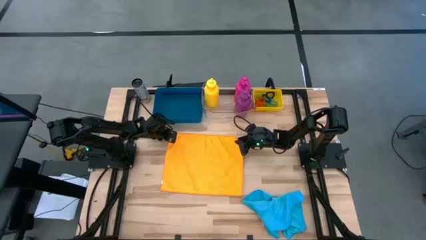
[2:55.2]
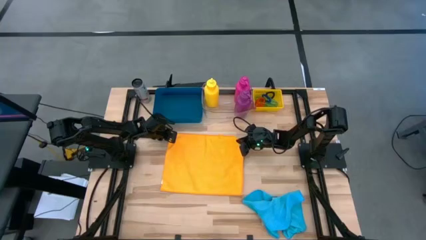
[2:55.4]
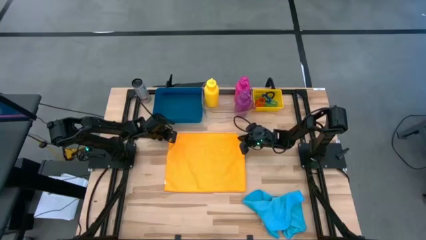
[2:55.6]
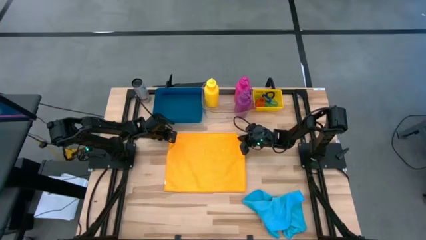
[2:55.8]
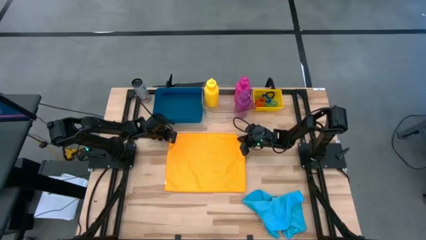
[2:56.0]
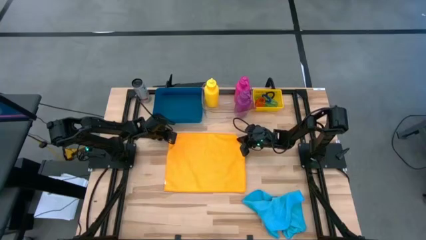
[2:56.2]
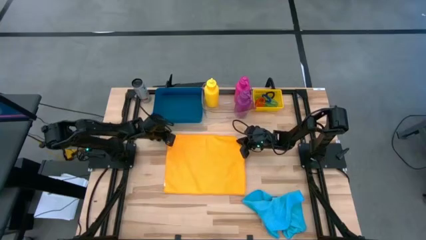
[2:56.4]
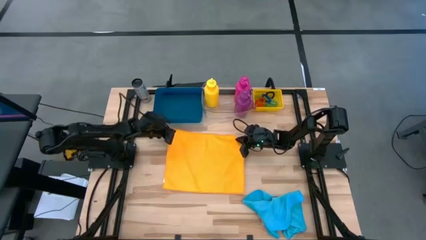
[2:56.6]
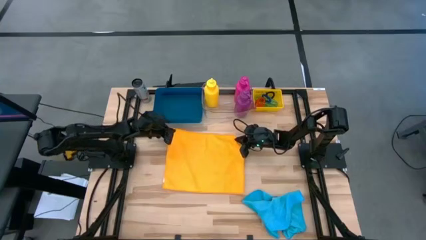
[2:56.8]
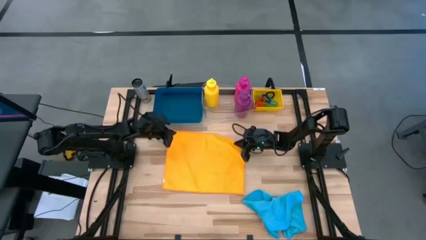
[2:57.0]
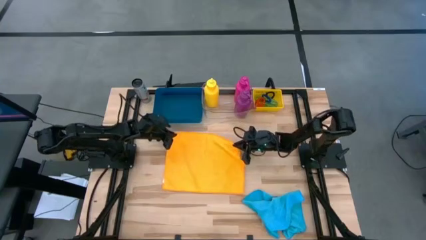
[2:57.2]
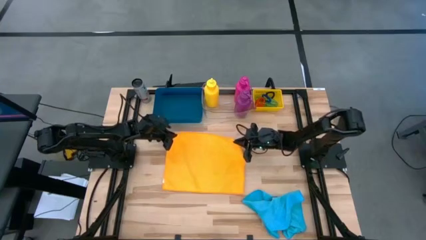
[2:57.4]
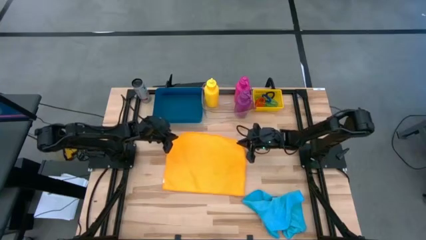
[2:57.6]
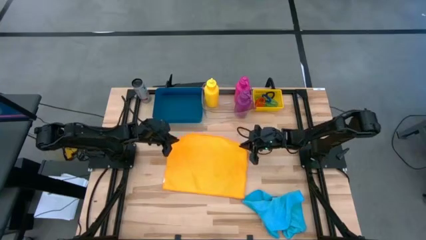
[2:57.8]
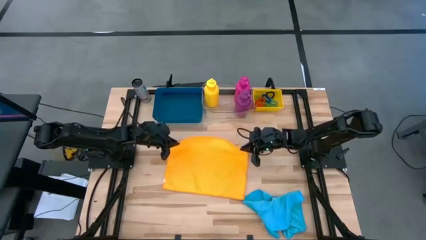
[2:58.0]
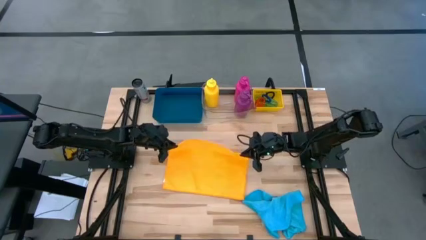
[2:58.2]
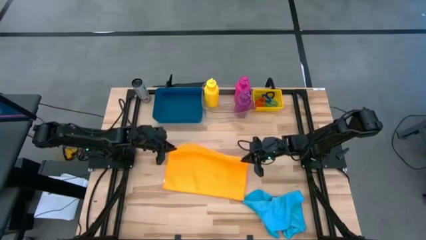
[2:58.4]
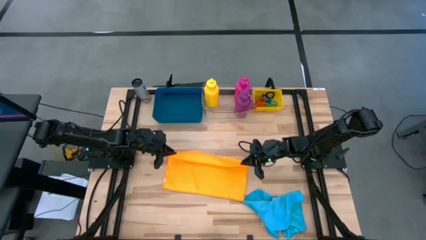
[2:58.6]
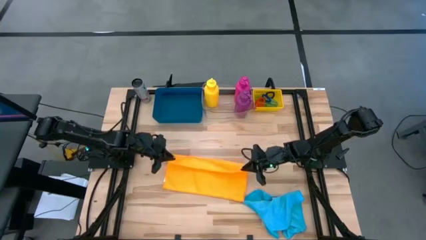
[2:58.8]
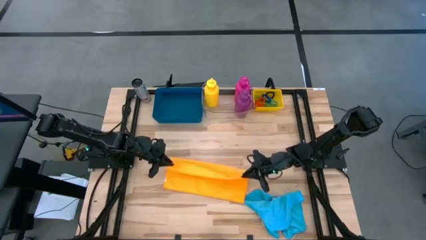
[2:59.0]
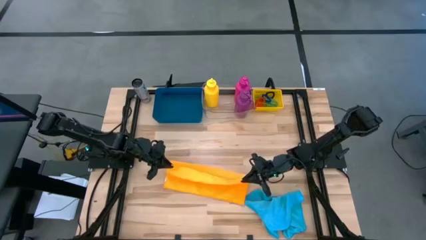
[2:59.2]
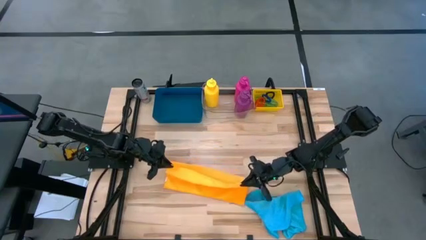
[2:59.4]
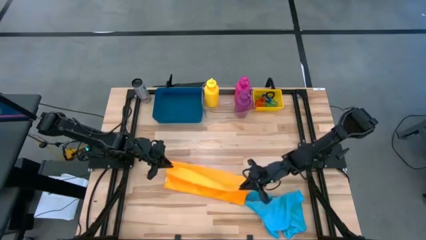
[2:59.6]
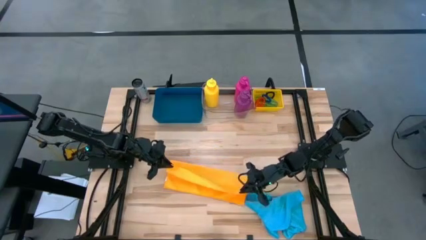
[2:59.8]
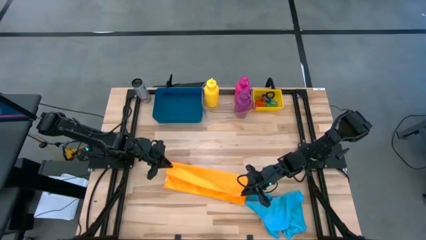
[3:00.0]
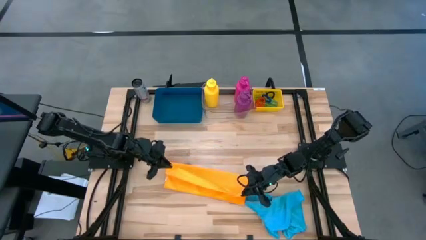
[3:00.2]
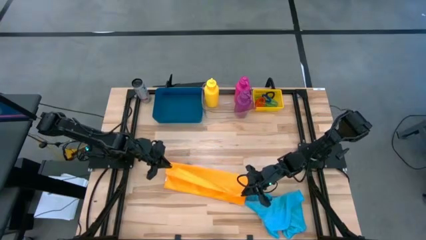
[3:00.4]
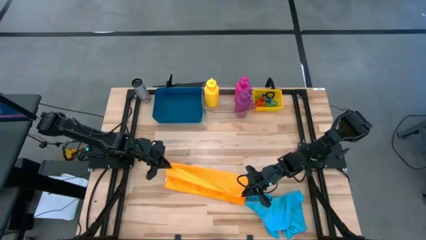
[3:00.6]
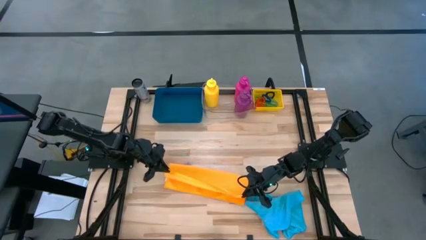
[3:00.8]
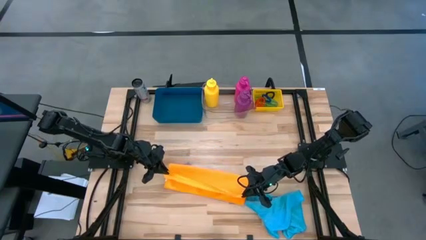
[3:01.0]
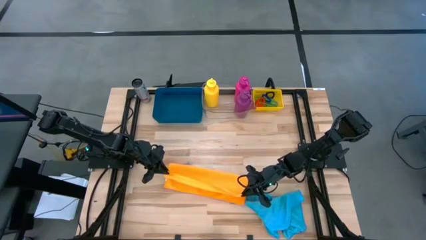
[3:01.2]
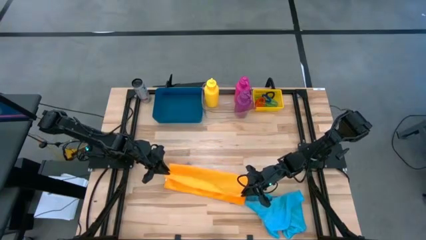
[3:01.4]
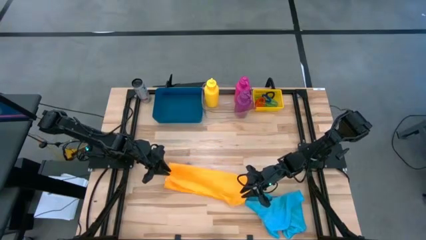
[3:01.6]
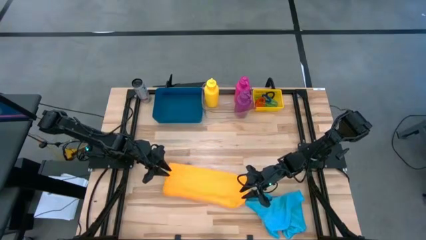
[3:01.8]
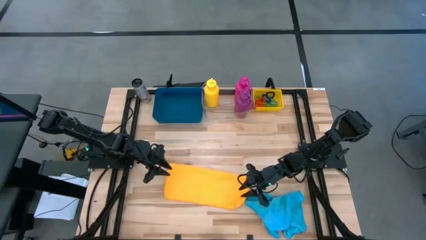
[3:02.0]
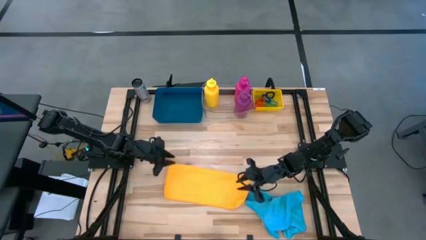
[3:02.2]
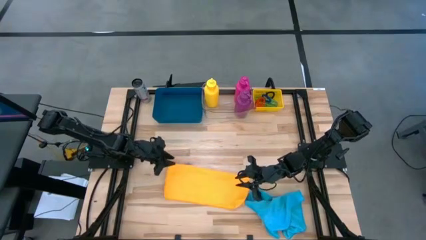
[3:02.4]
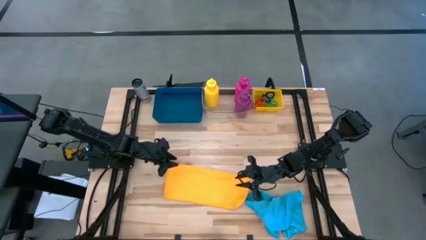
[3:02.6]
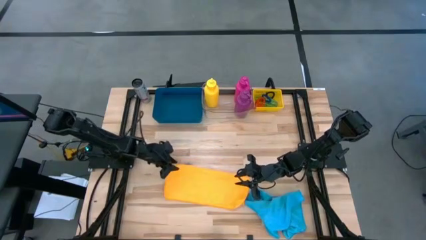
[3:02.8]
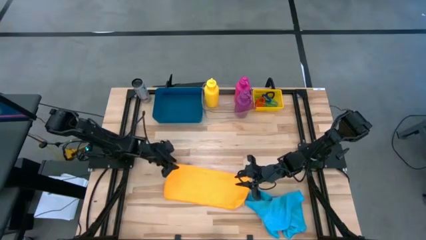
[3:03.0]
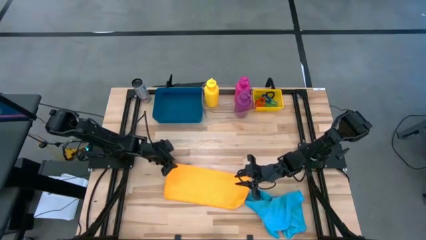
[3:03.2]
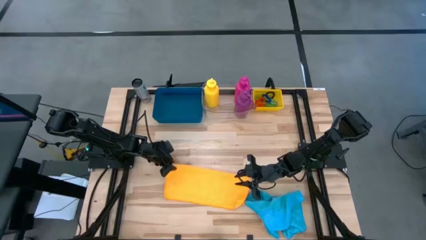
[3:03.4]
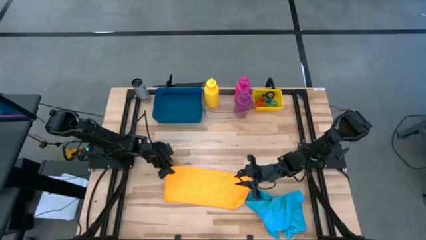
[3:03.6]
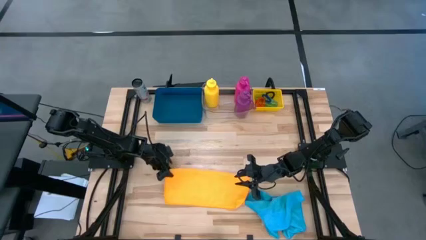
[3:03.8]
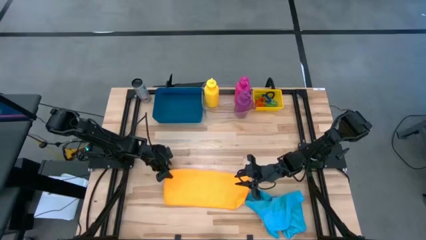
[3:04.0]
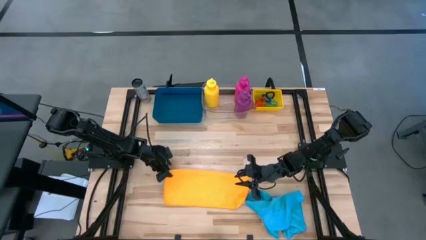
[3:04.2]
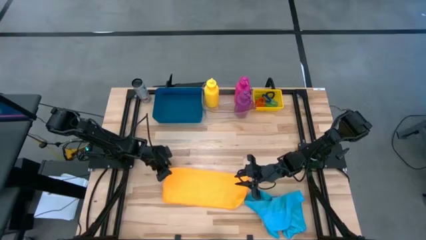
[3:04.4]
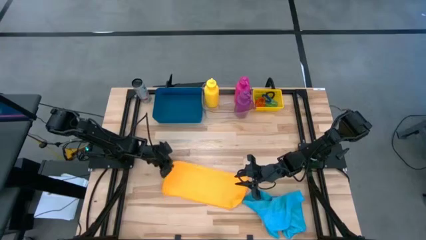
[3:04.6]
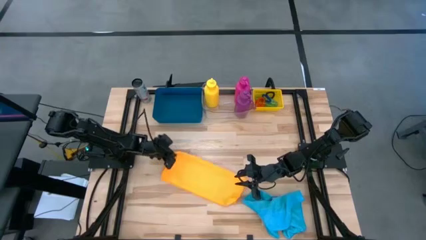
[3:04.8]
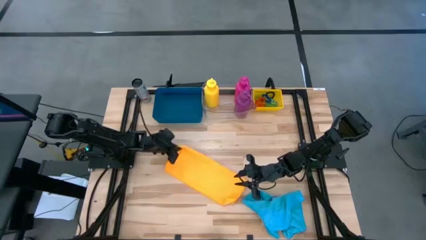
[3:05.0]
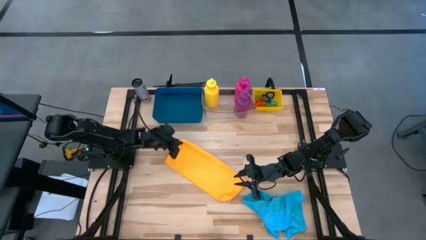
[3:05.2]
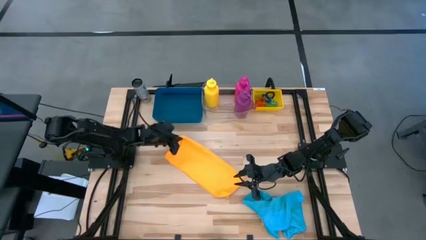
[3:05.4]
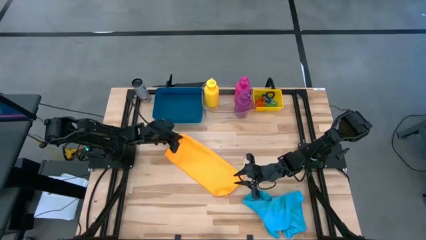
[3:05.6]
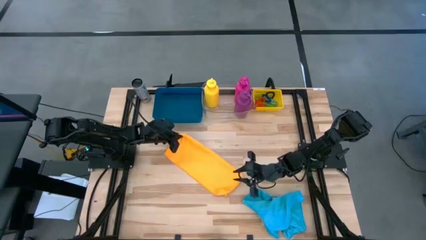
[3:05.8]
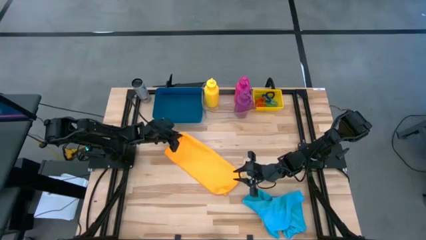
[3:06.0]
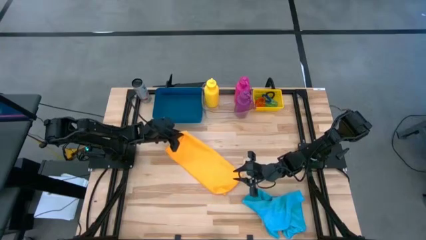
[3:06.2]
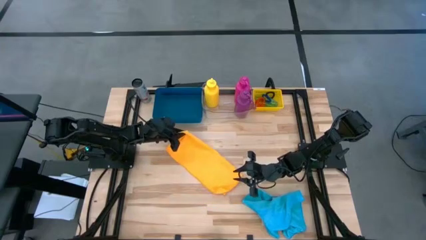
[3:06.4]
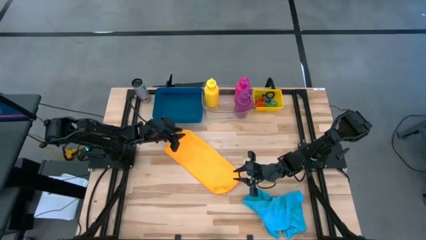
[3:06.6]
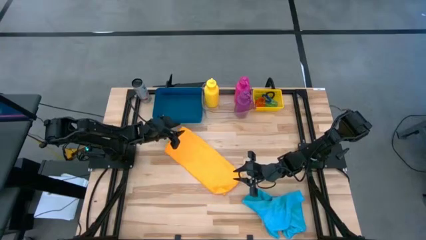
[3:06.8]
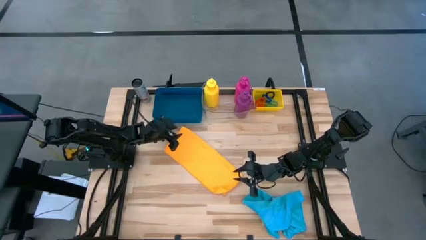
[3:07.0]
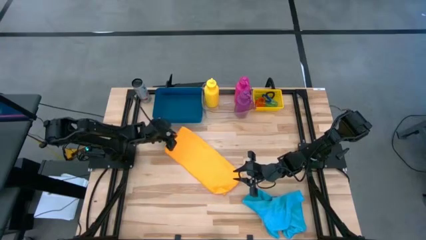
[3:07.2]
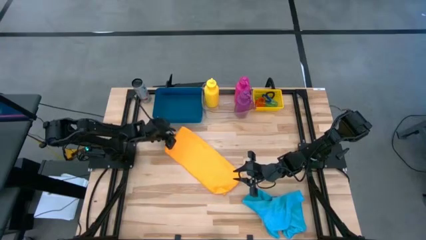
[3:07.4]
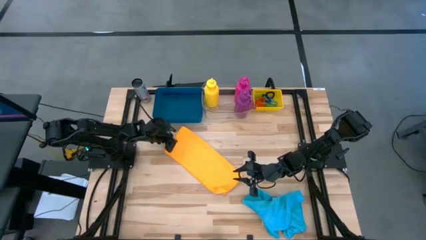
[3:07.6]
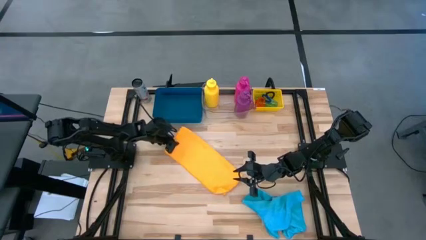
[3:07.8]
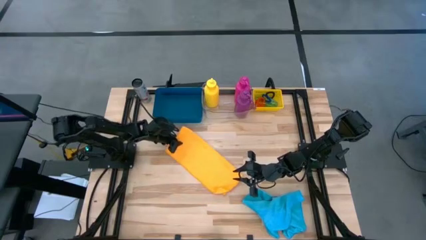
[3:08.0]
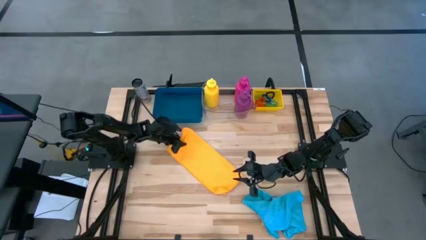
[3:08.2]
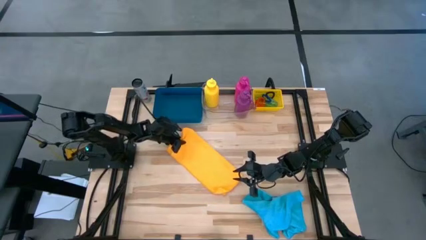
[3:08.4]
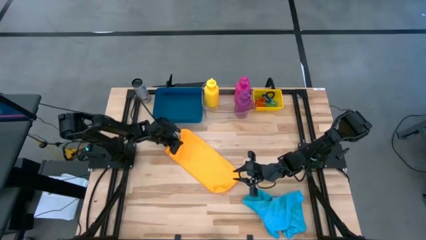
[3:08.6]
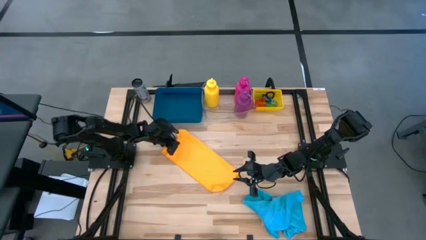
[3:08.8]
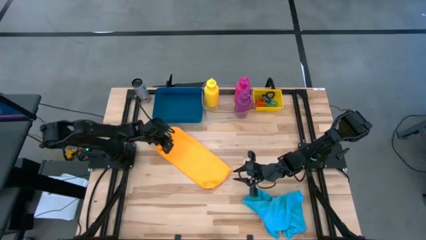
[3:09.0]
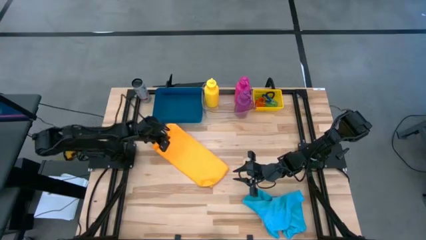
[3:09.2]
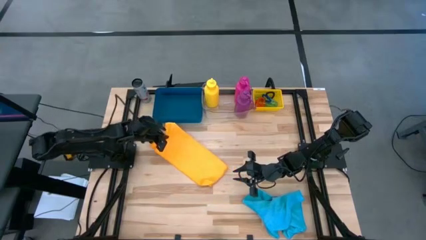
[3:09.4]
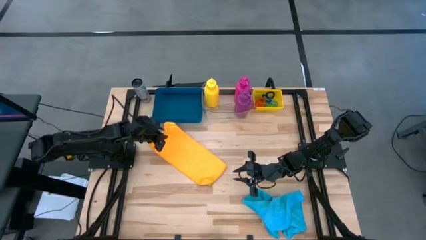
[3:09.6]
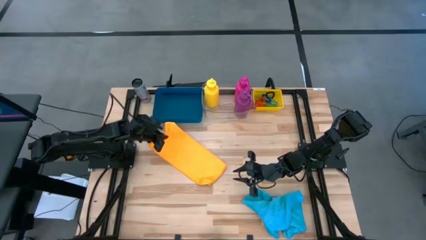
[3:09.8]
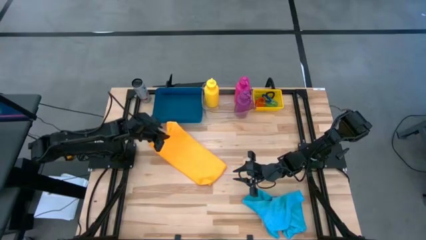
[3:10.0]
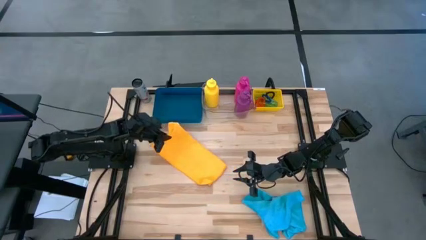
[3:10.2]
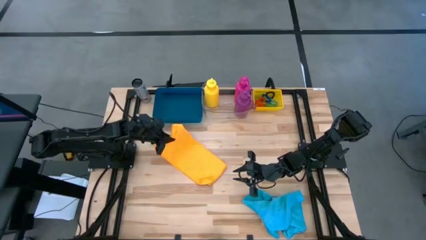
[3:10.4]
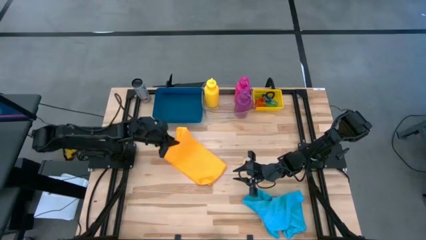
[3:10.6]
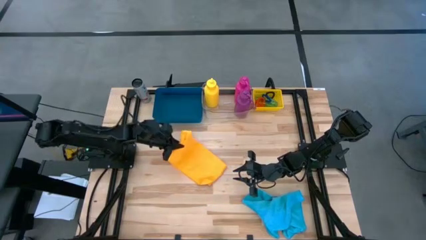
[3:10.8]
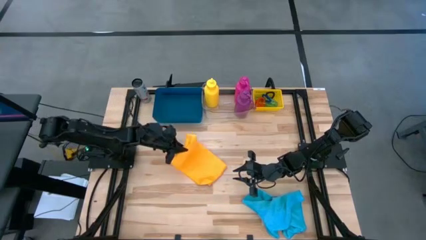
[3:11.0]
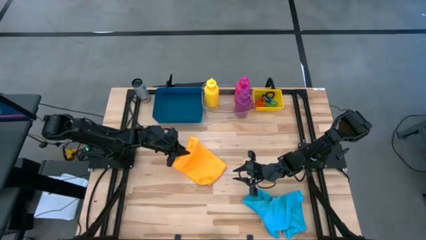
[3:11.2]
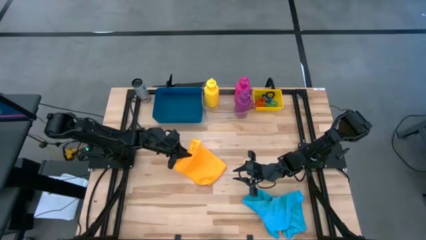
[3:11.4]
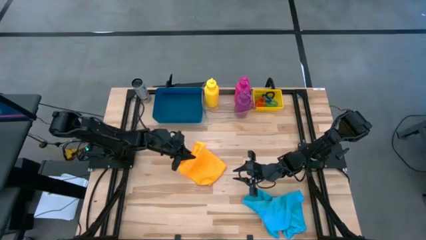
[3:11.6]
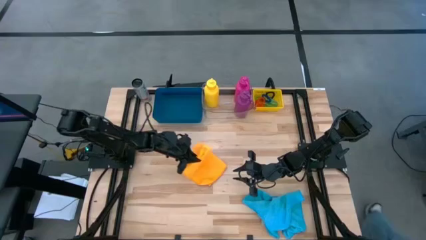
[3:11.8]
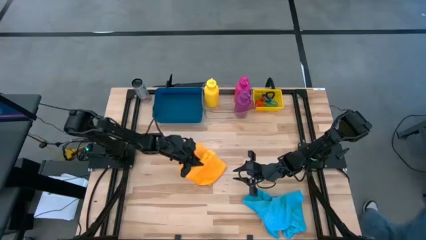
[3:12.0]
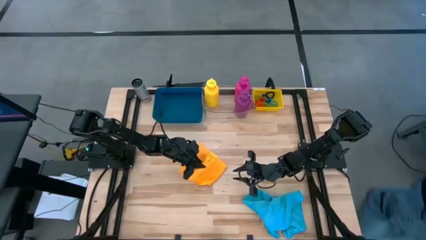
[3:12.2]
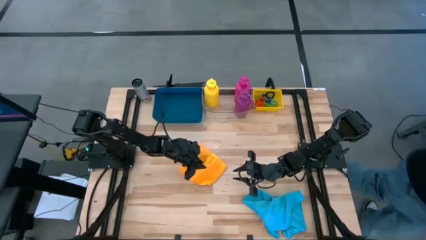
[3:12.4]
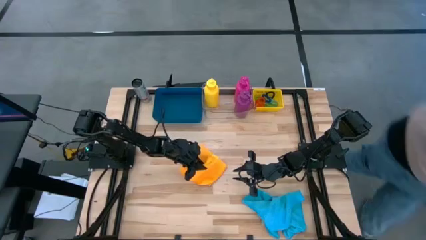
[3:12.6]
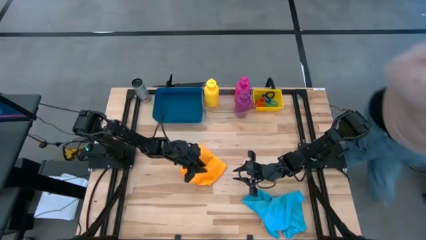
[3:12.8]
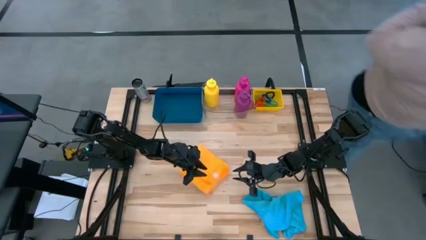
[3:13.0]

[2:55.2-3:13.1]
Task: Pick & Place Sports Items
Fold the orange towel
